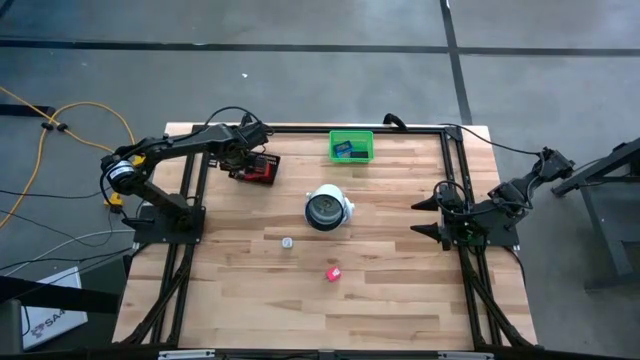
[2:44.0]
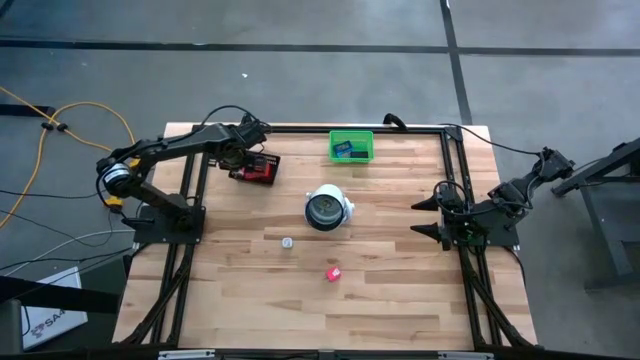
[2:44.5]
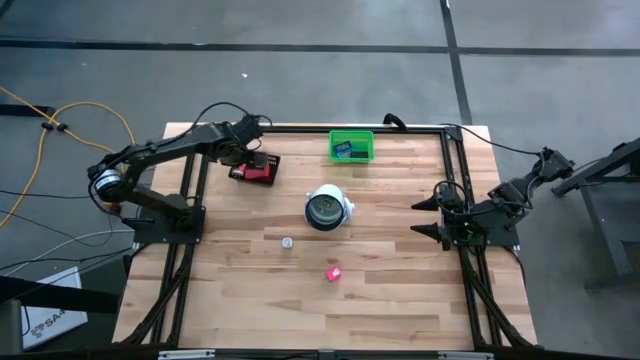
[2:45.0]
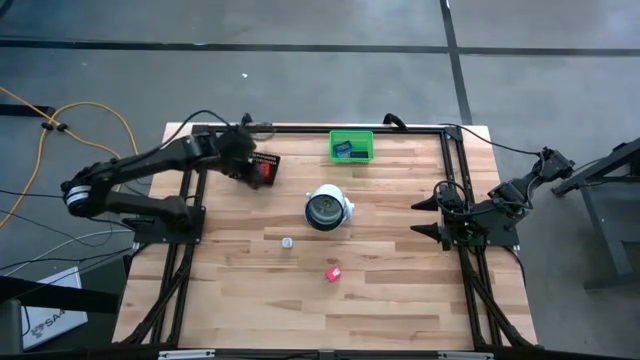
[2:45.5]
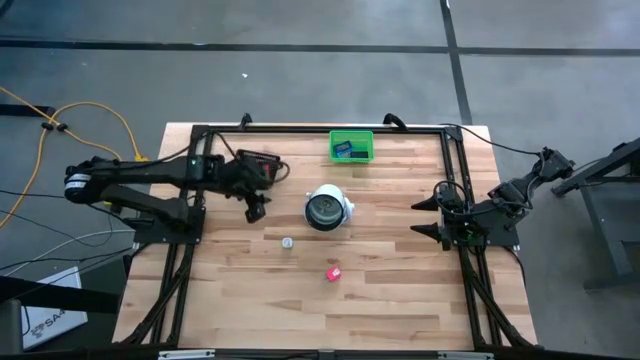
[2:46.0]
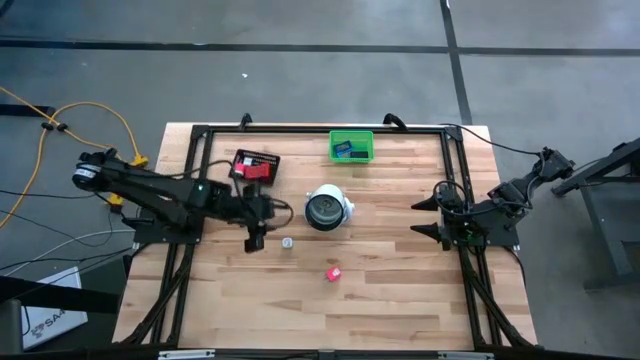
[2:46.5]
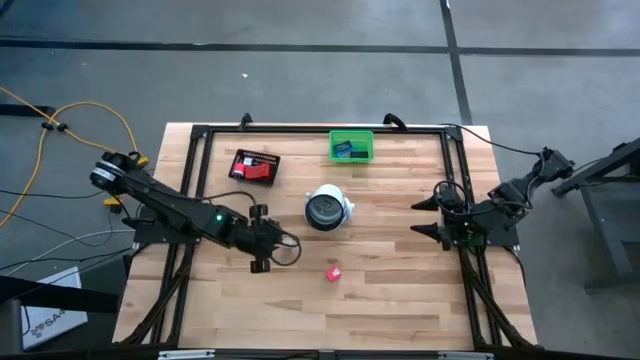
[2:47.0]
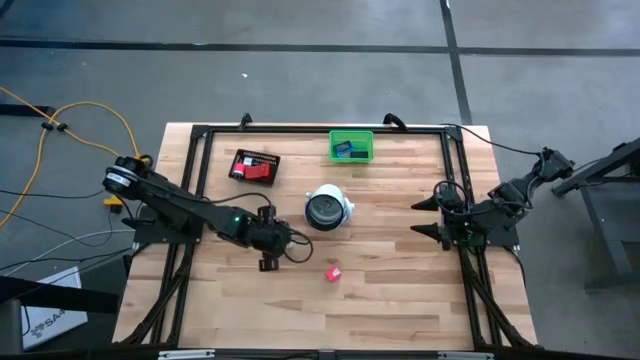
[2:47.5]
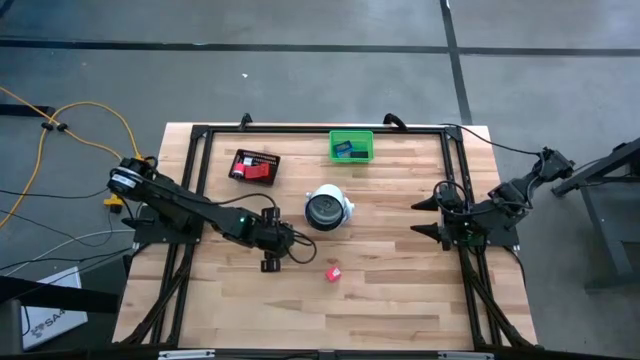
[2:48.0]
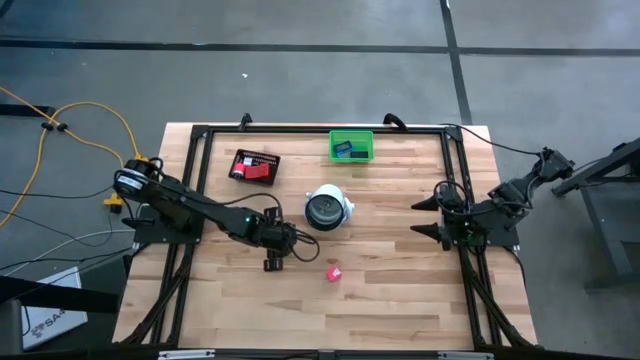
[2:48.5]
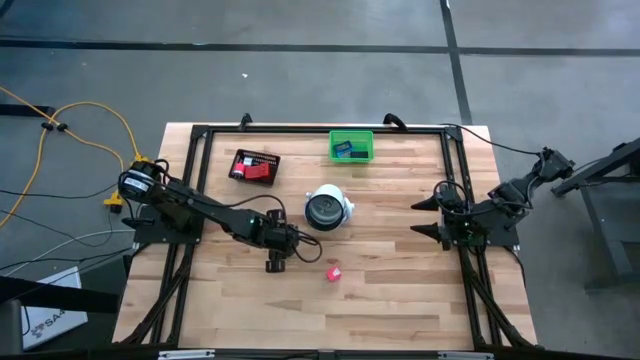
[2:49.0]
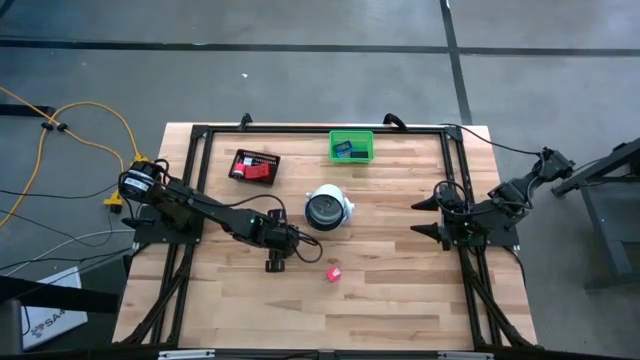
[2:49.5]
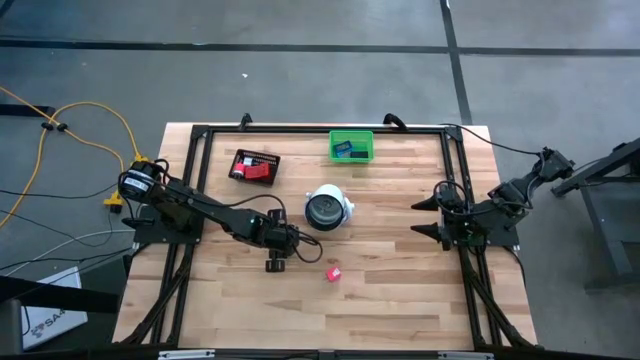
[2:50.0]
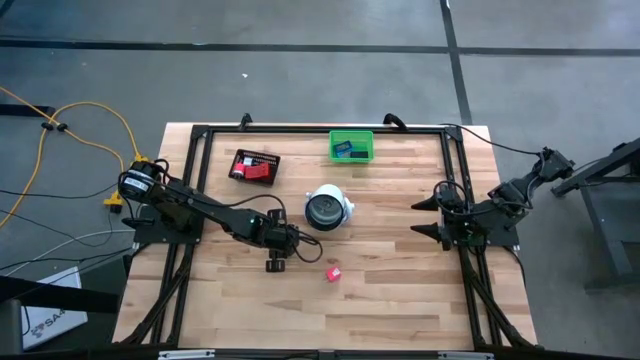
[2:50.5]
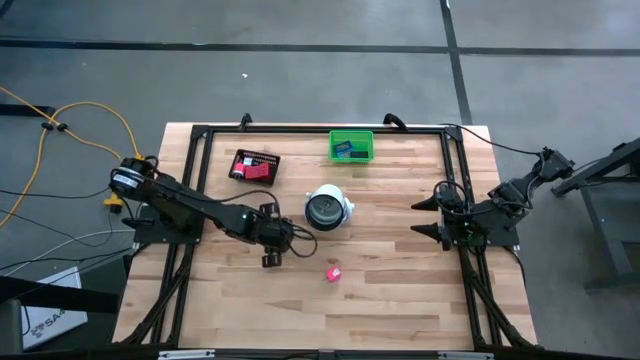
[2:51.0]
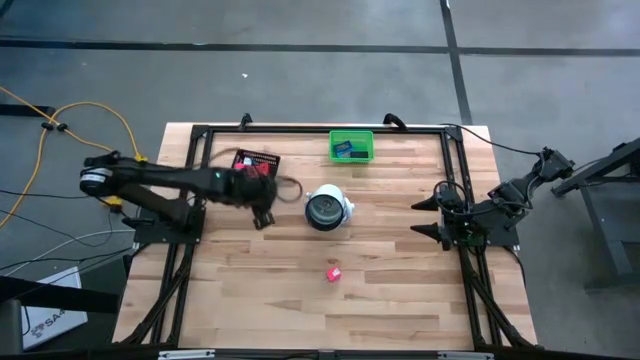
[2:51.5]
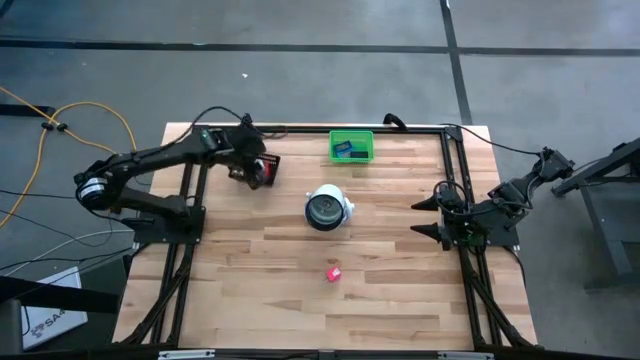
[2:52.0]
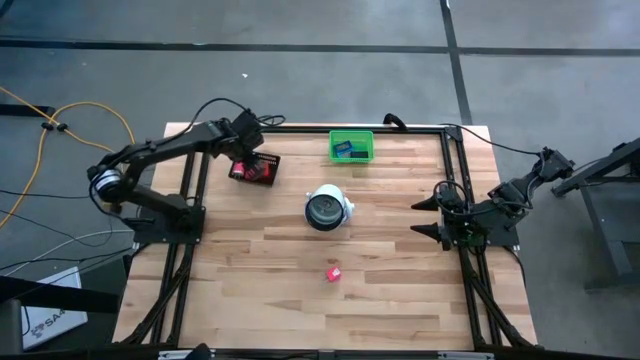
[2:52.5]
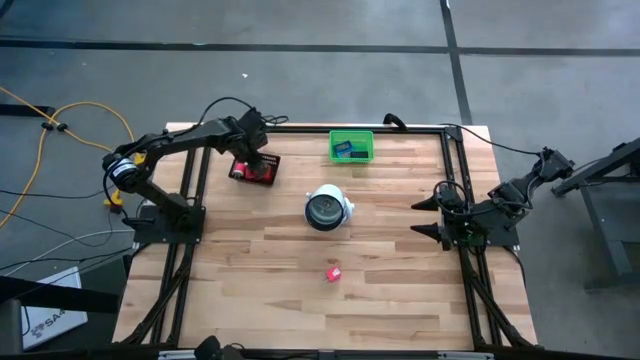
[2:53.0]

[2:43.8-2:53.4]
Task: Pick & Place Office items
Put the green charger adapter into the black bin

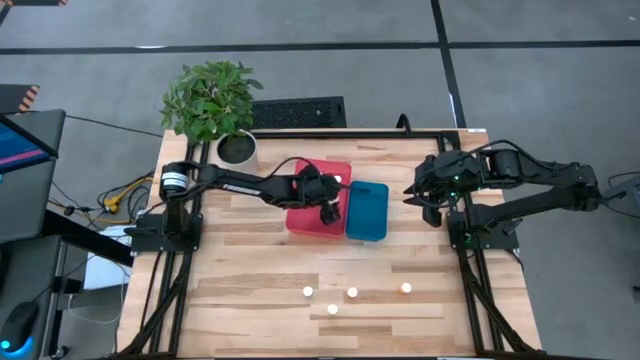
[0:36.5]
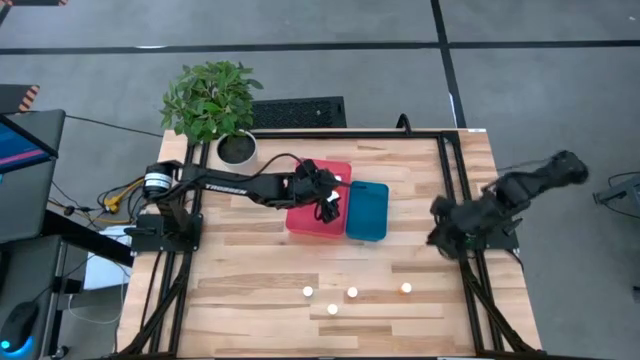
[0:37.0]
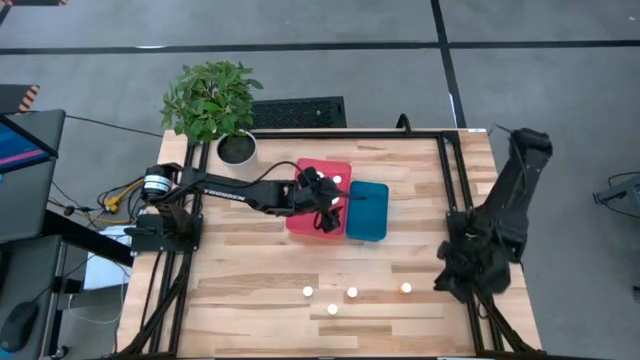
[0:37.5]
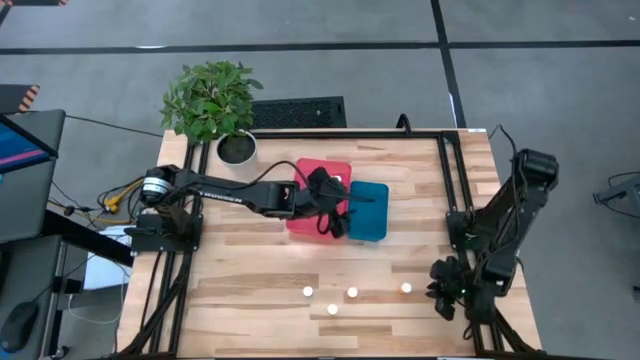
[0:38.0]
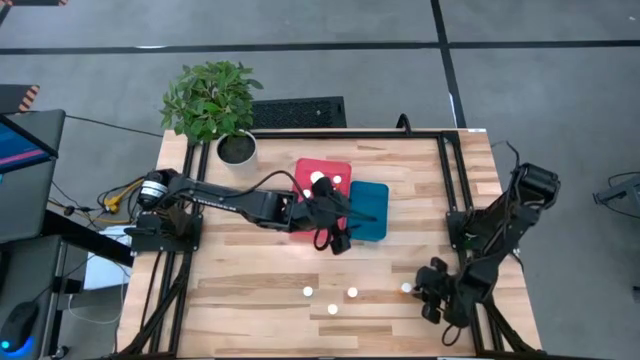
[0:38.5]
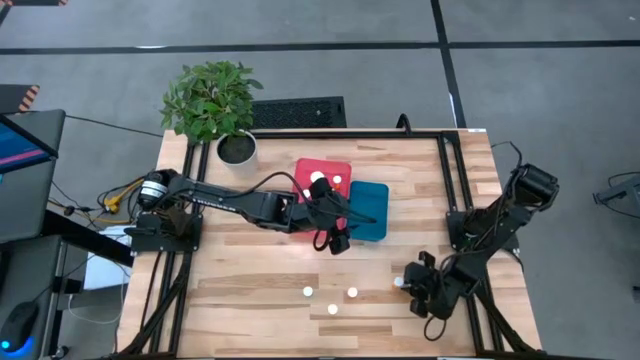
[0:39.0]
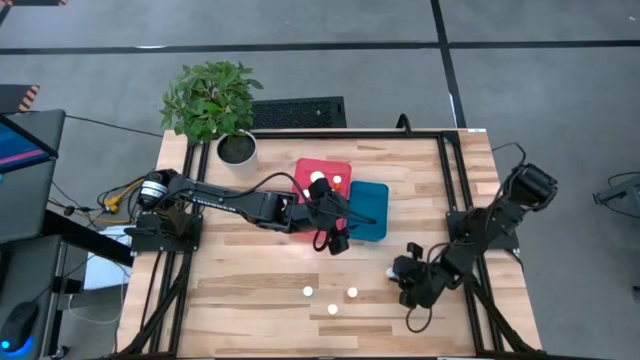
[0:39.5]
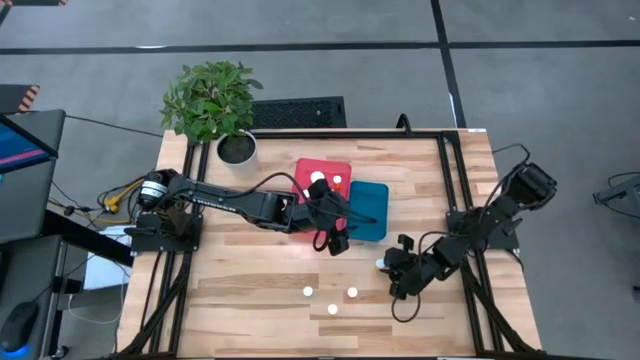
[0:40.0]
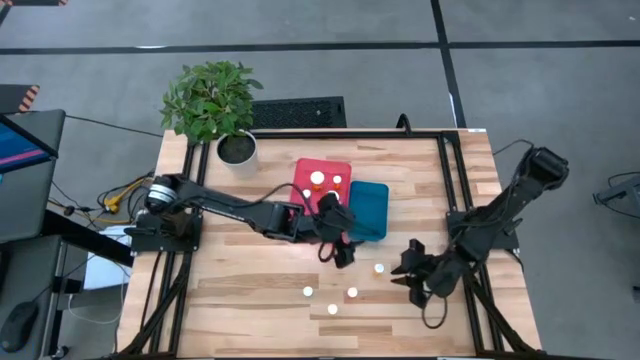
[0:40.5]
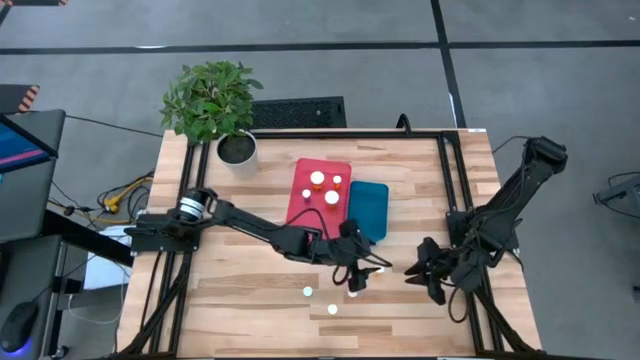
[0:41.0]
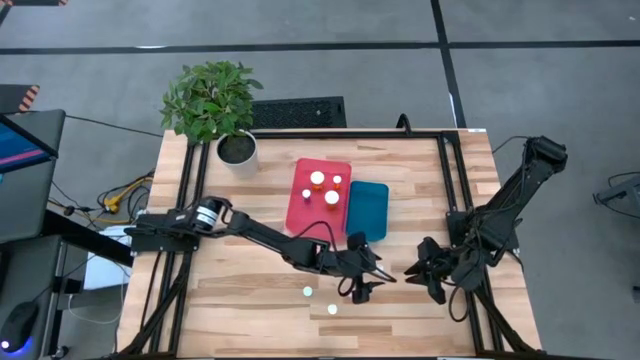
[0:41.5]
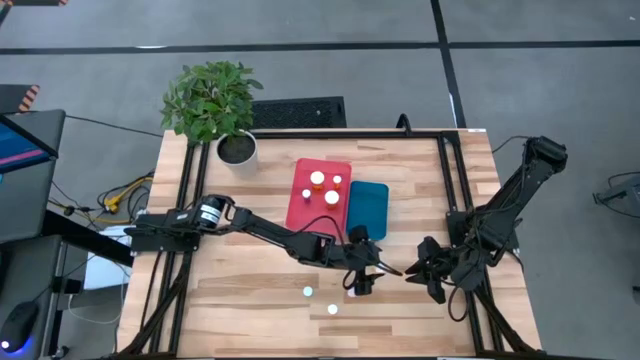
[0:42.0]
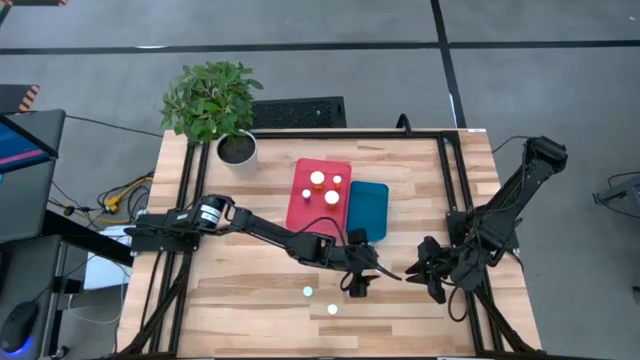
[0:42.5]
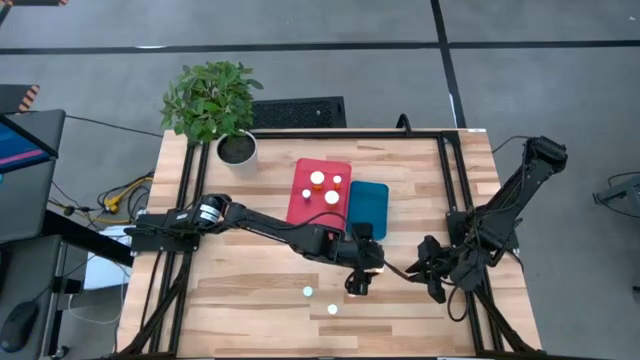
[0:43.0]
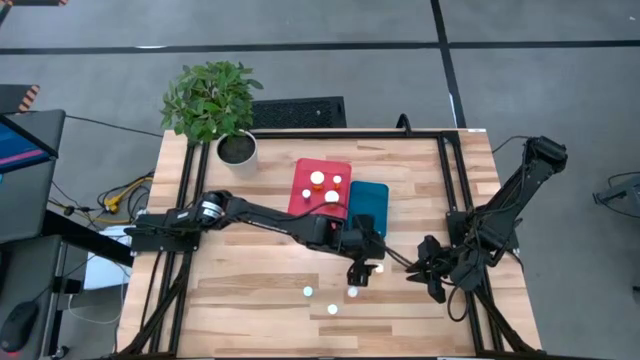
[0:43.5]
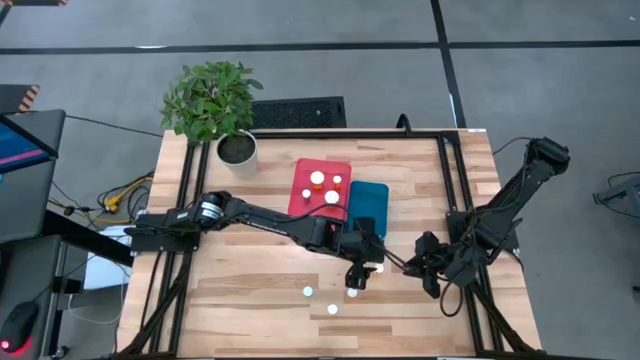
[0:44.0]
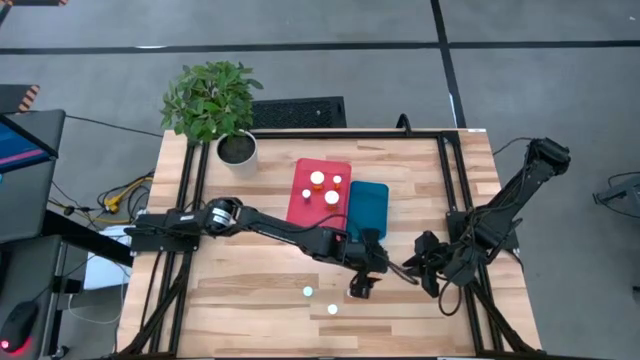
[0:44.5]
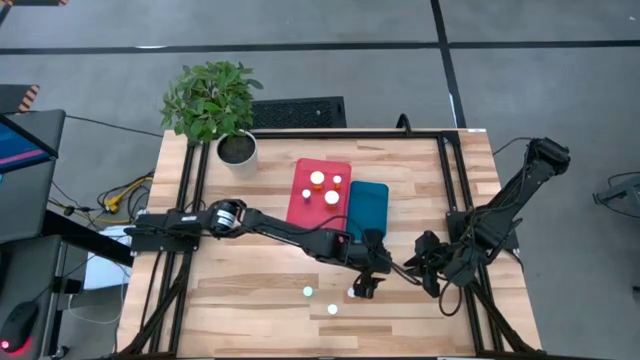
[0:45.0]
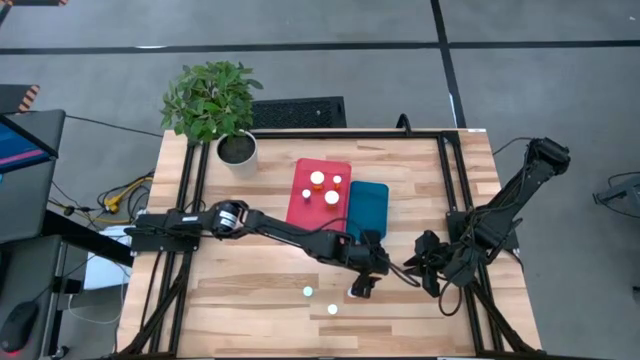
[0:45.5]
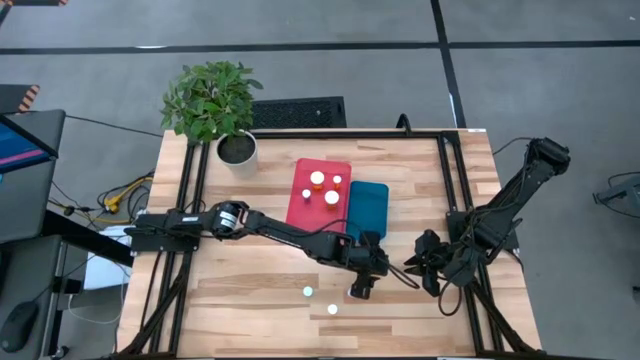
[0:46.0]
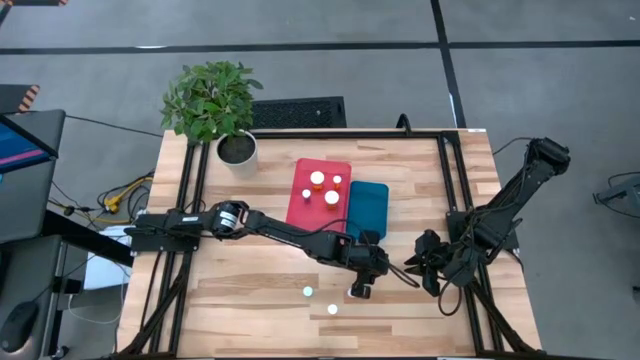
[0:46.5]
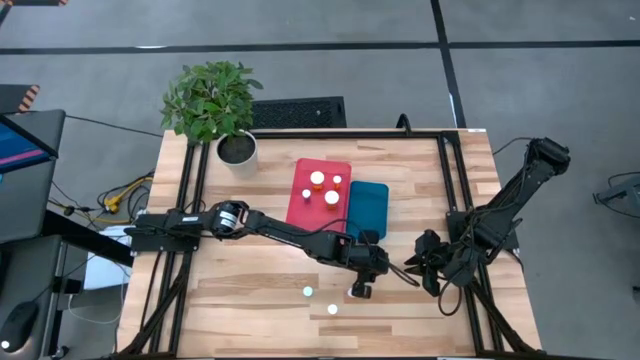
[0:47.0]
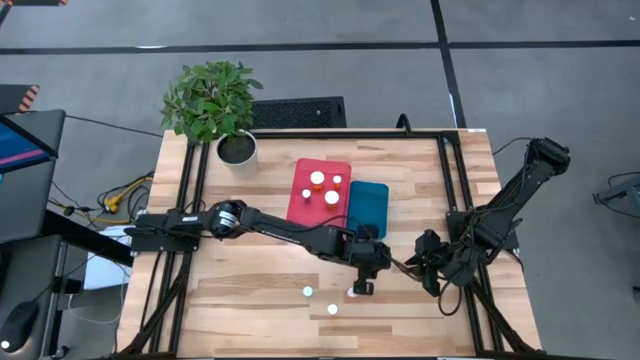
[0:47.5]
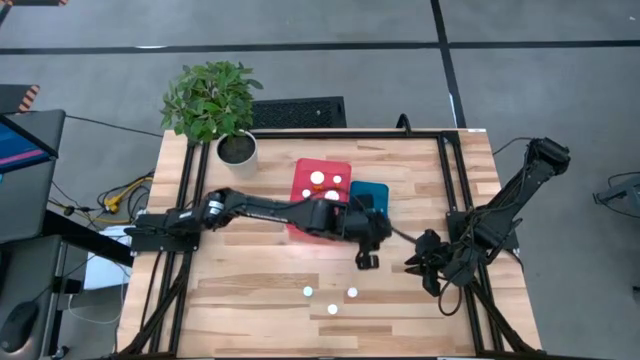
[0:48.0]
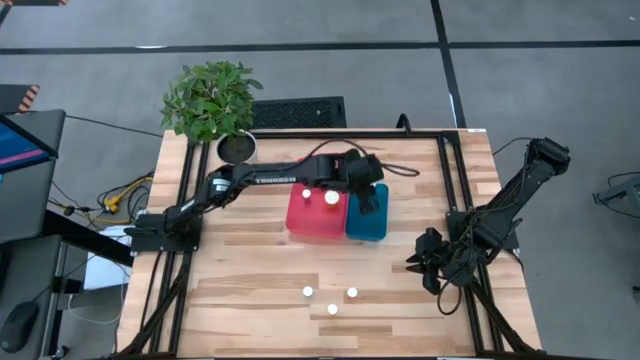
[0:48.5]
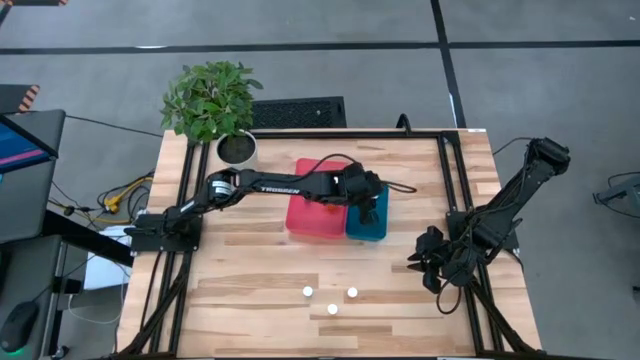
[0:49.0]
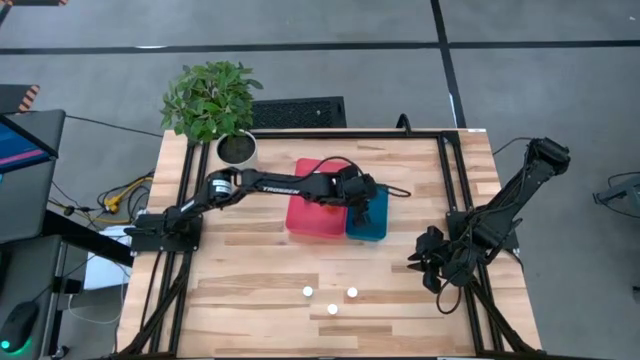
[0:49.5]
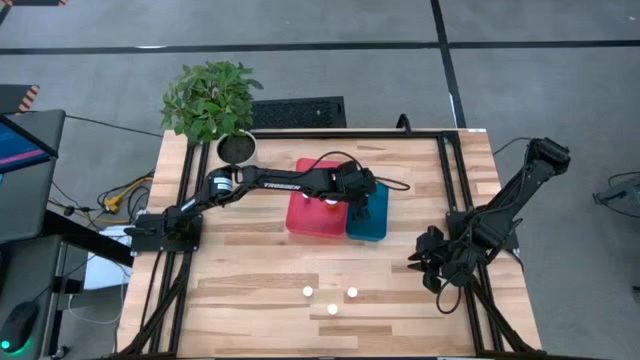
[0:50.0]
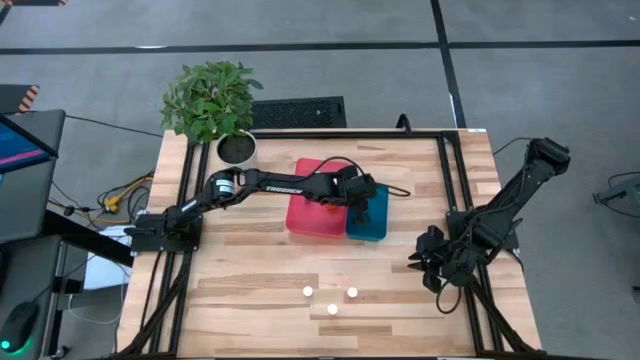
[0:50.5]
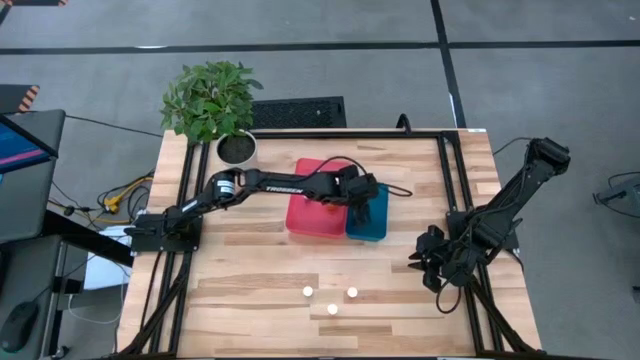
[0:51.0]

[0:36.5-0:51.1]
Task: Pick and place medicine bottles into bin by pill shape (circle, oval)
Put the small orange pill bottle into the blue bin
